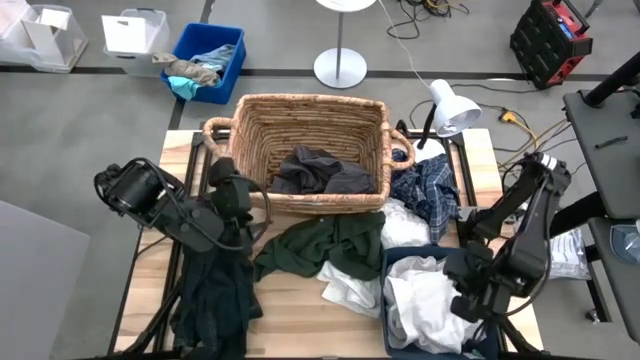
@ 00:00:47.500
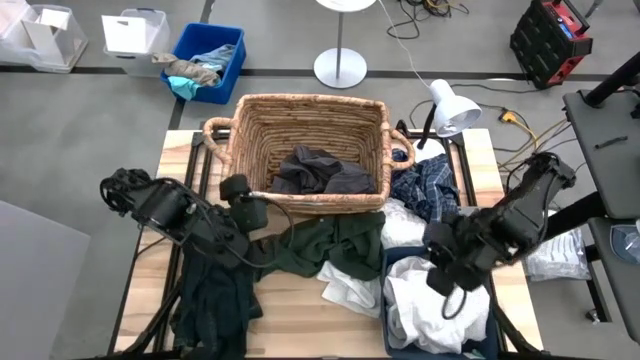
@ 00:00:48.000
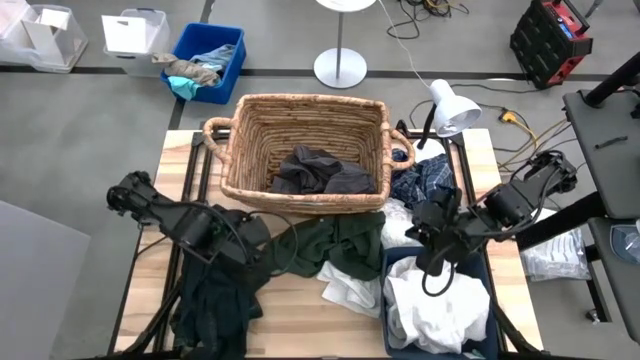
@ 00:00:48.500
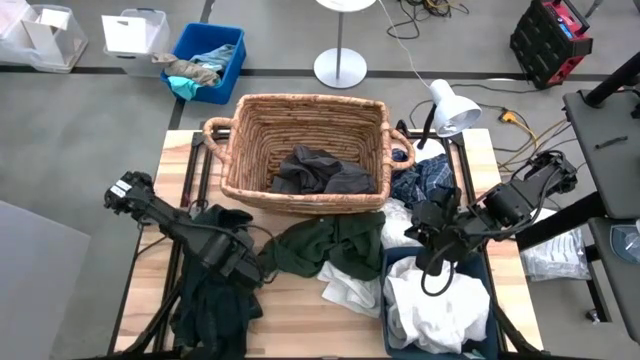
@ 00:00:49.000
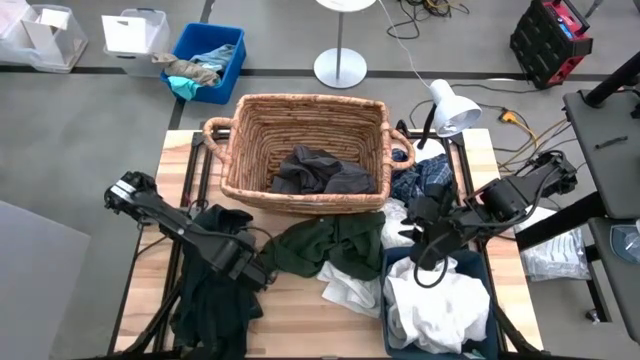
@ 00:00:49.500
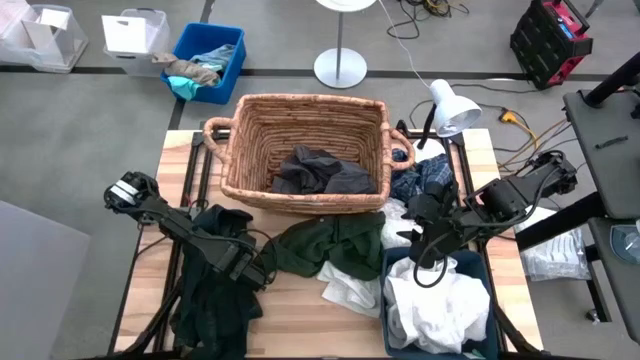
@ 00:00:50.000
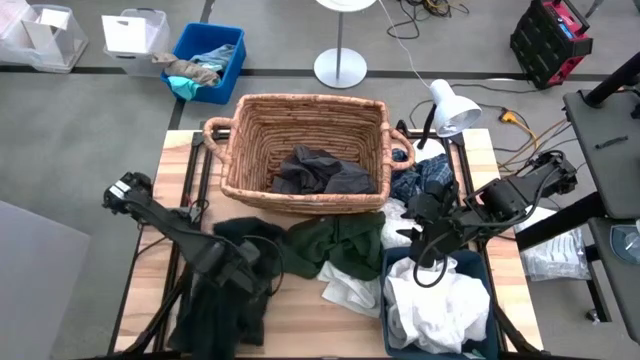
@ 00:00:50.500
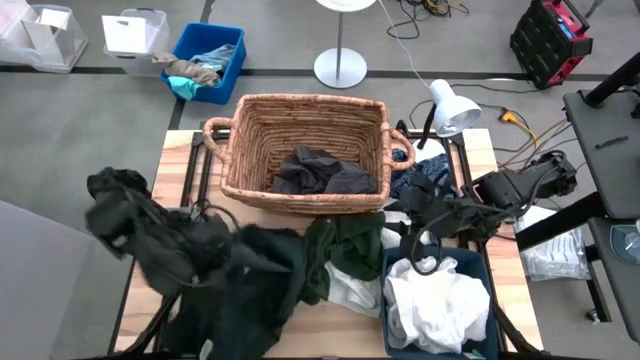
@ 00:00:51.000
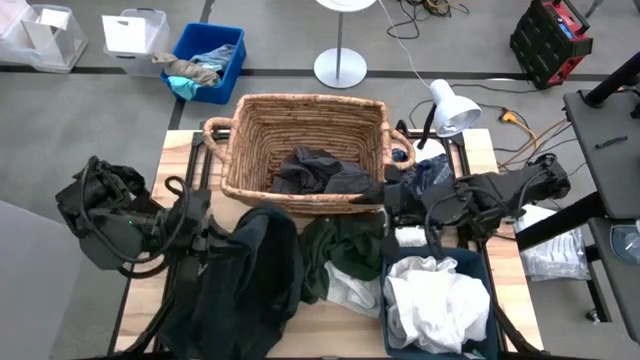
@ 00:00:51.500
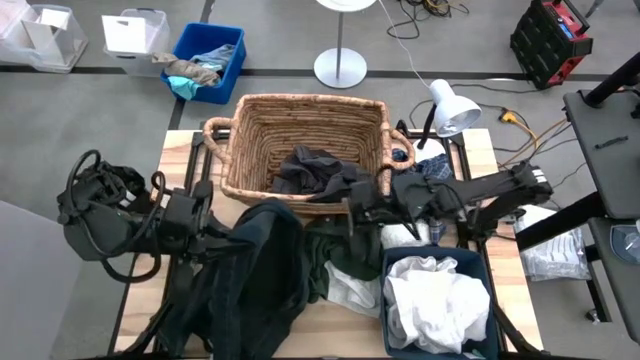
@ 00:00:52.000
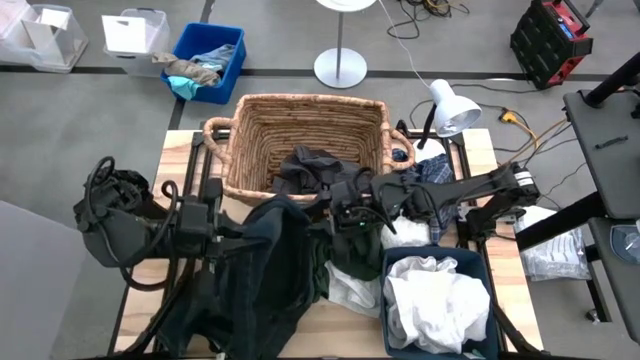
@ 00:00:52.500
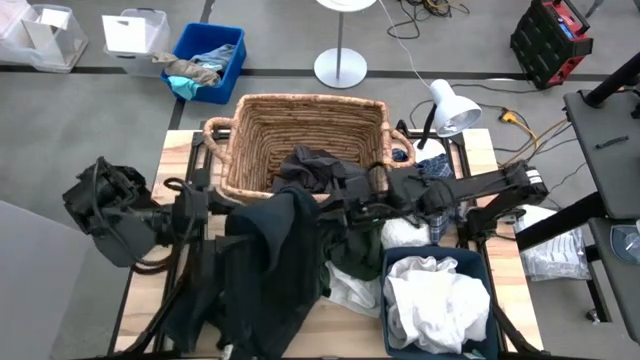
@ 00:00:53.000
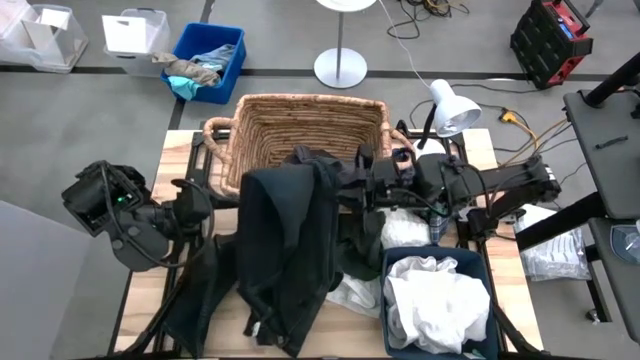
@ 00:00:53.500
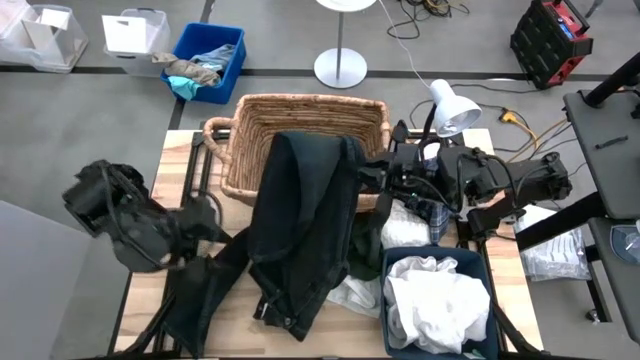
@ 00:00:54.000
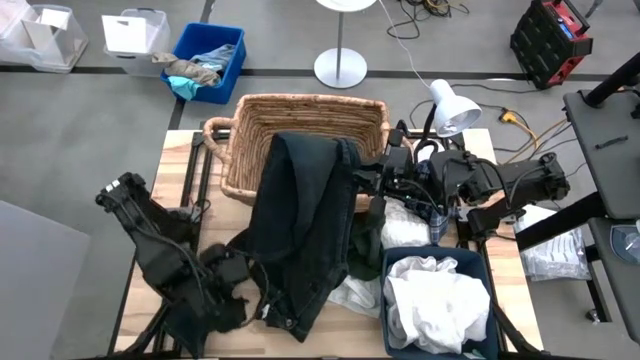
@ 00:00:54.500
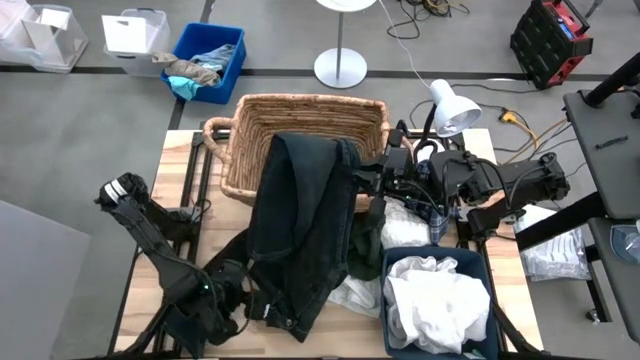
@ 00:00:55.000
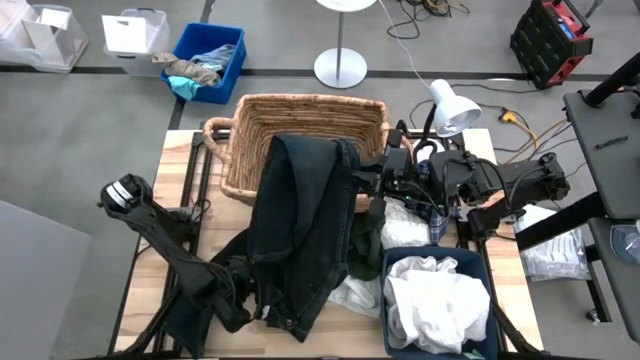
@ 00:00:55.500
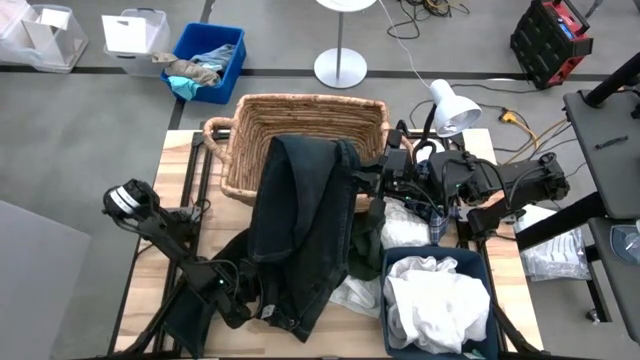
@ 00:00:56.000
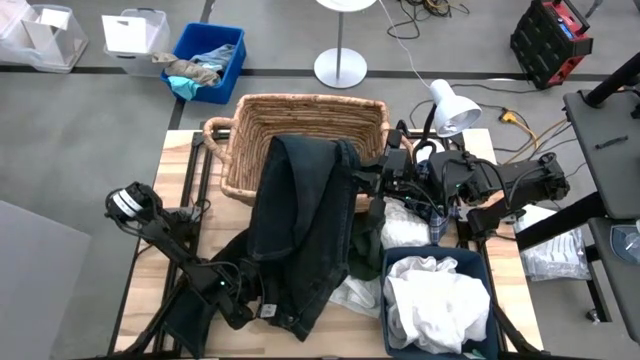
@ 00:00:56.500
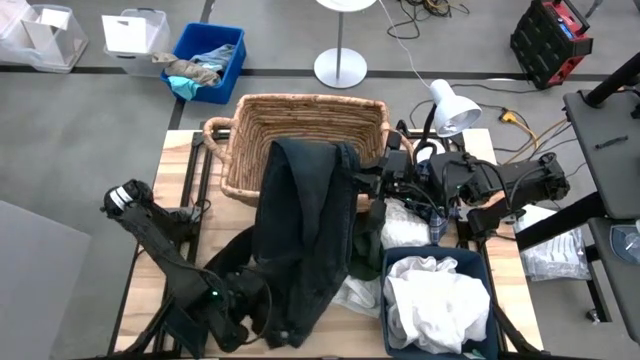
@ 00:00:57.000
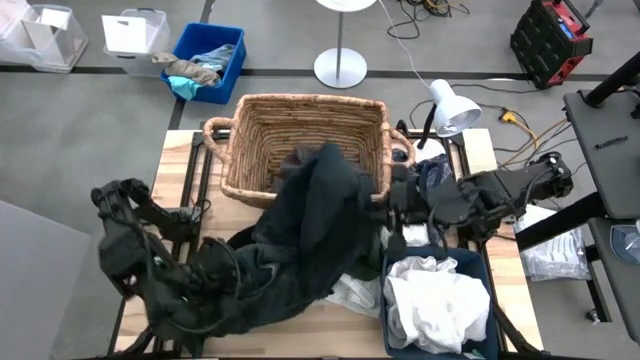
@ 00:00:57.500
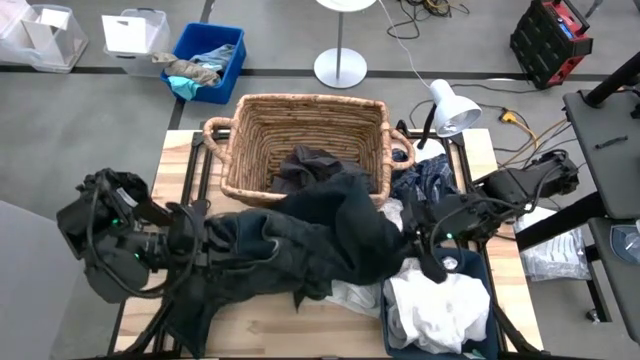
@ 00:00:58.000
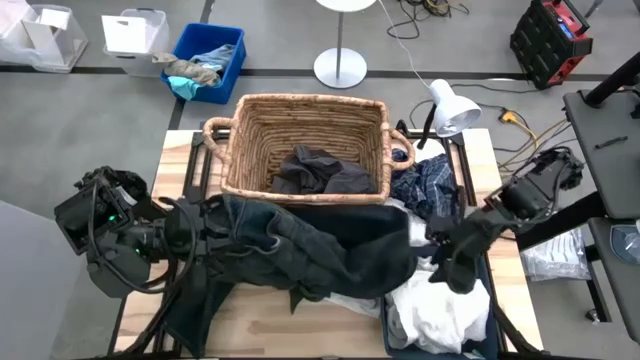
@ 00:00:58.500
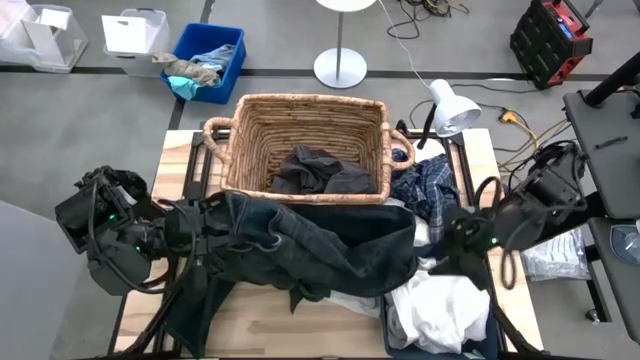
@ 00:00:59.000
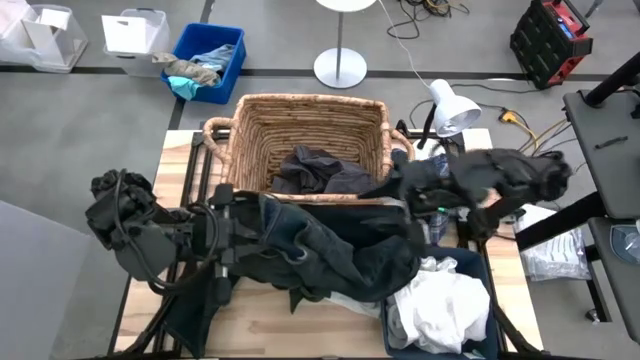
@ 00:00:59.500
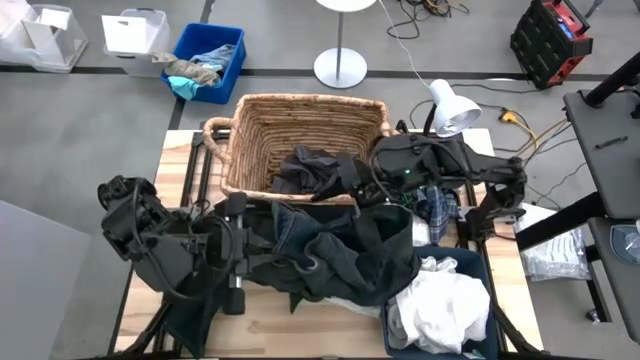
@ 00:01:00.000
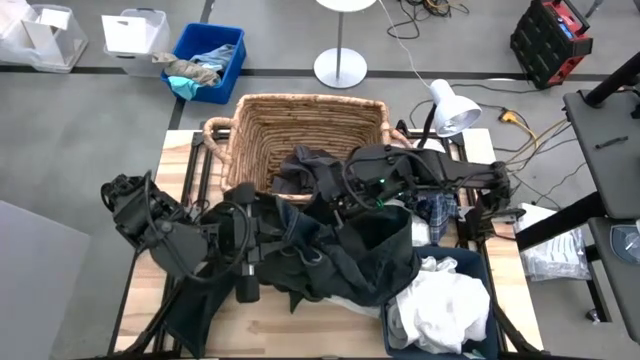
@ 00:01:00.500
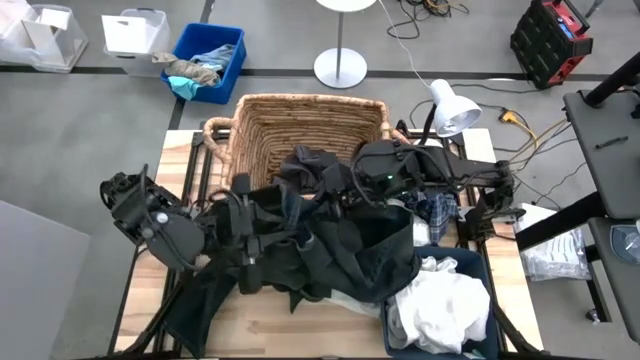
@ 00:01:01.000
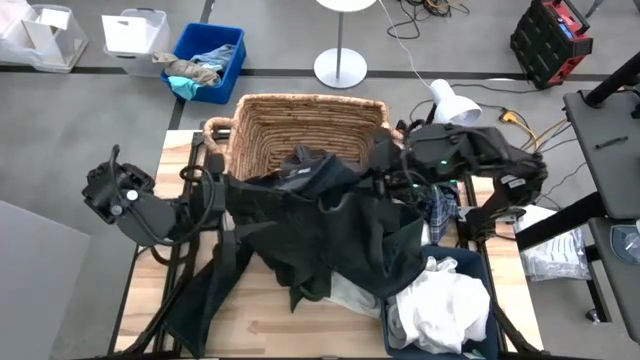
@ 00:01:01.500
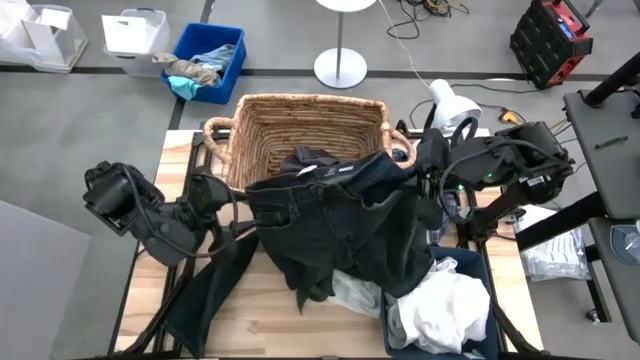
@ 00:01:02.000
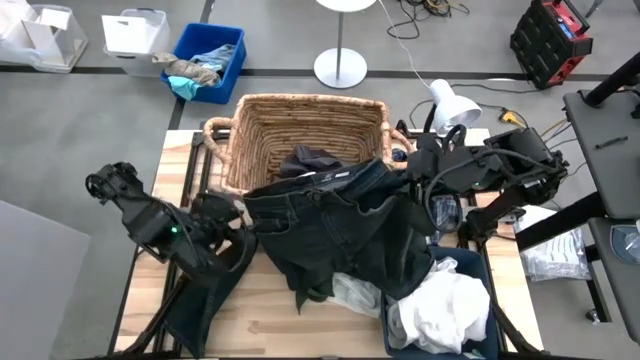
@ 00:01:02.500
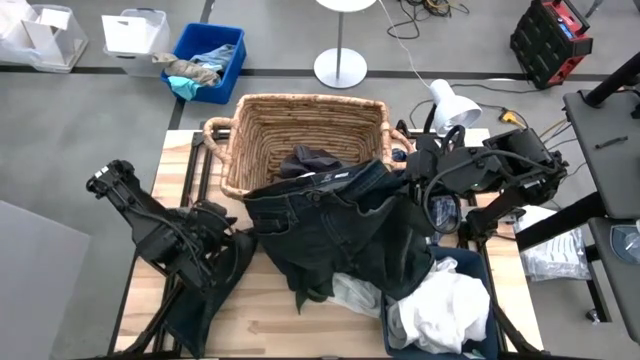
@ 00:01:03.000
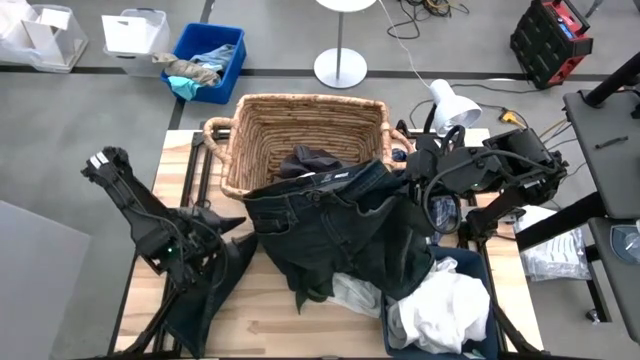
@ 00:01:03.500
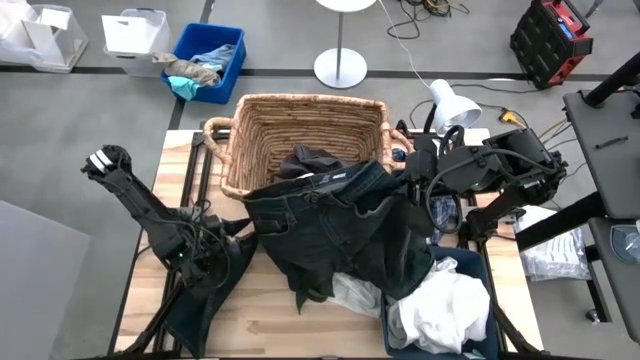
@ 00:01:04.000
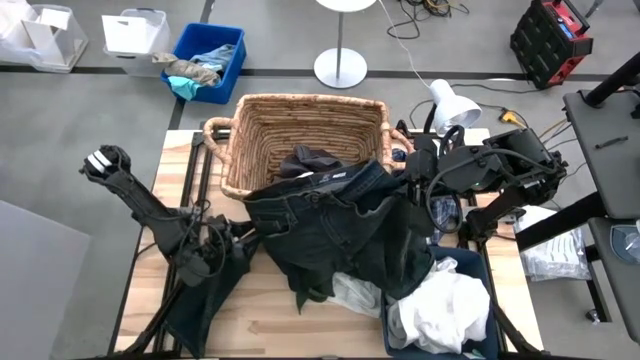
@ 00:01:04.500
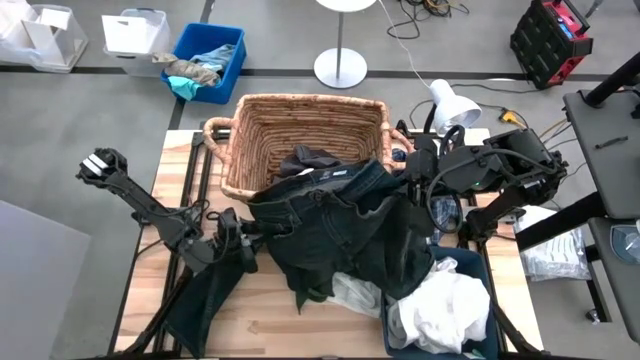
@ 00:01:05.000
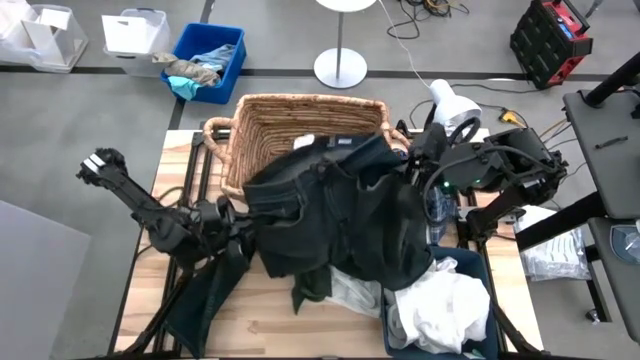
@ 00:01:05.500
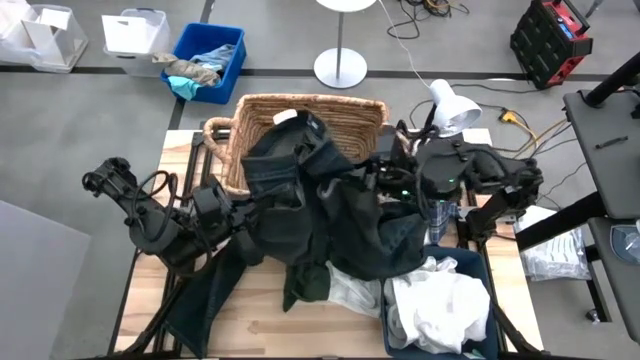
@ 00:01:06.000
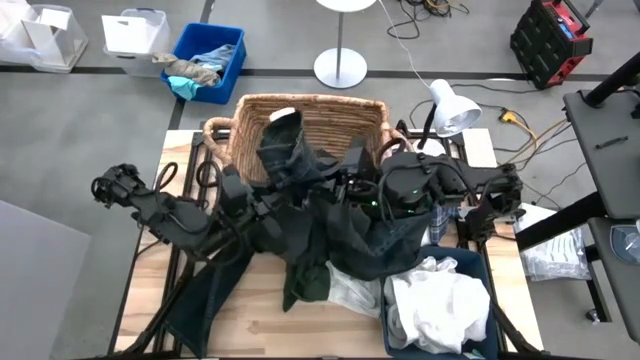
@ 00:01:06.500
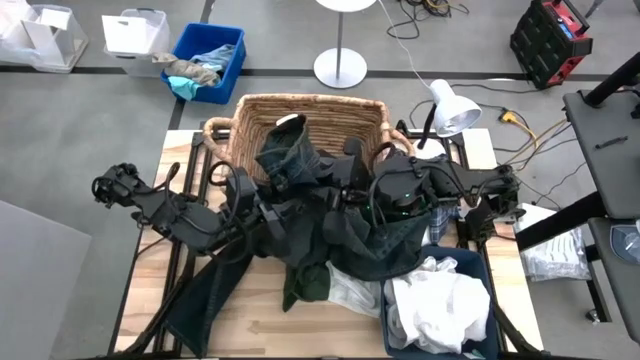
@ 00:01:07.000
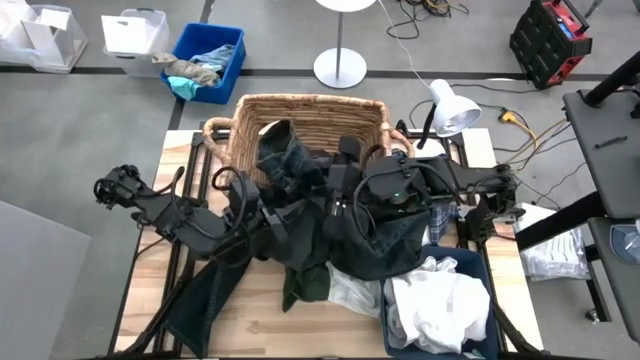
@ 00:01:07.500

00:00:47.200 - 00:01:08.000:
Task: Sort clothes
Put the dark blue jeans into the brown laundry basket
